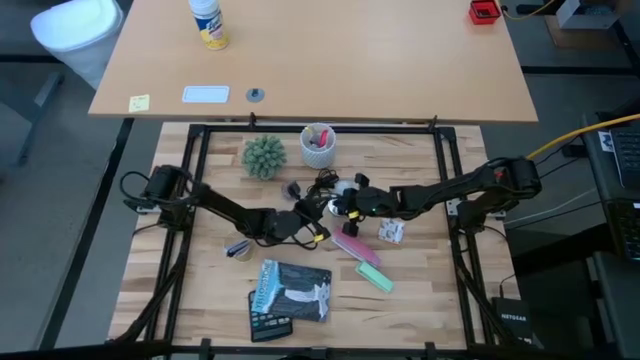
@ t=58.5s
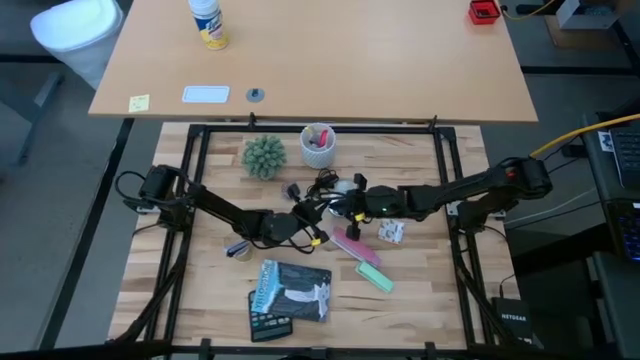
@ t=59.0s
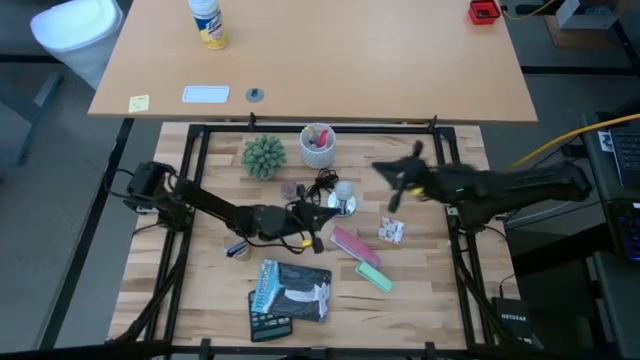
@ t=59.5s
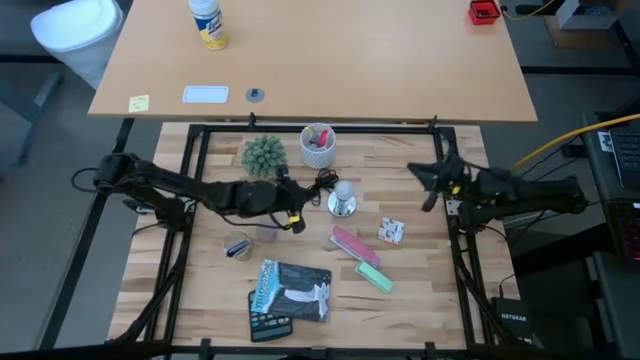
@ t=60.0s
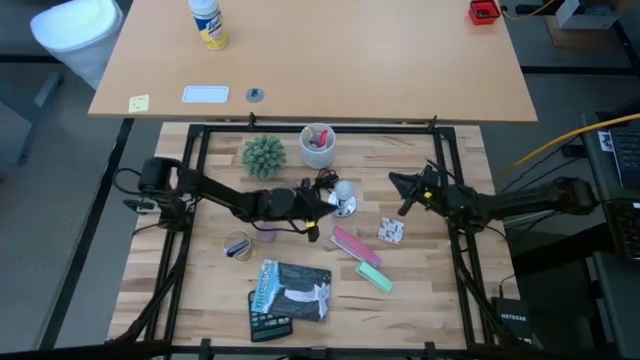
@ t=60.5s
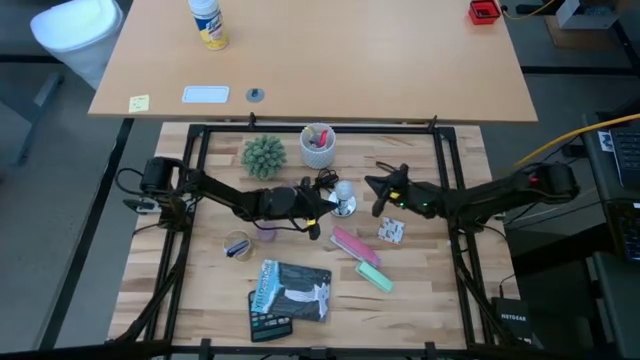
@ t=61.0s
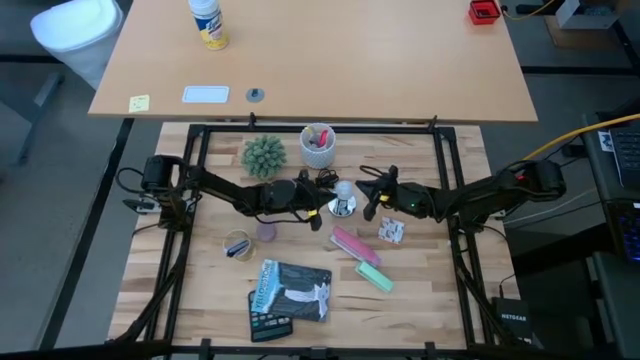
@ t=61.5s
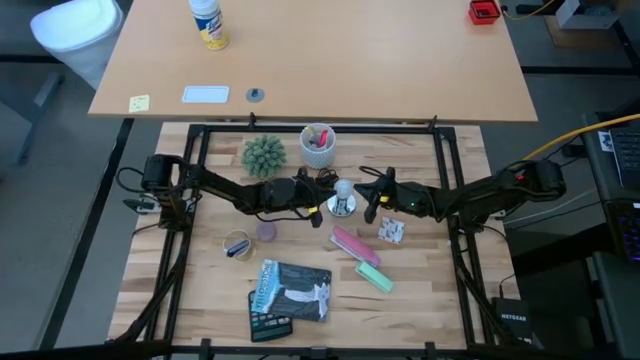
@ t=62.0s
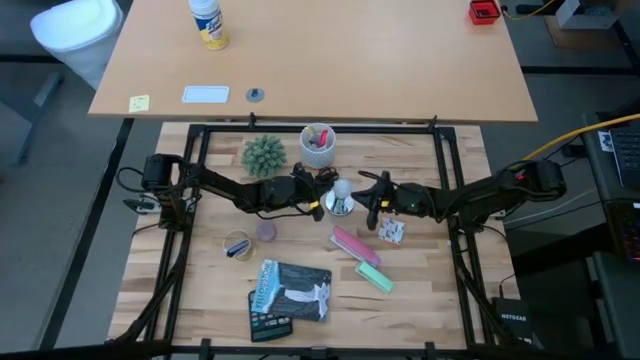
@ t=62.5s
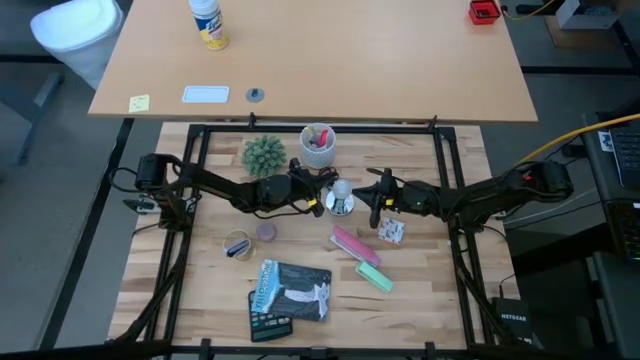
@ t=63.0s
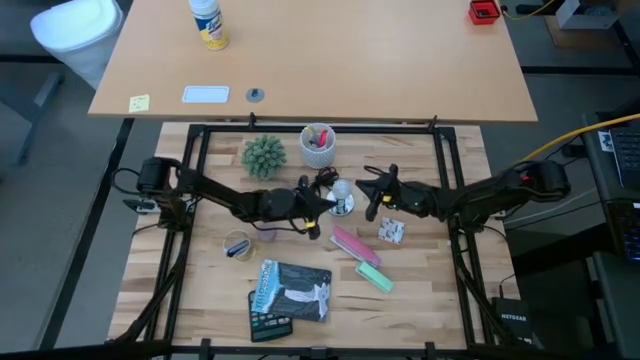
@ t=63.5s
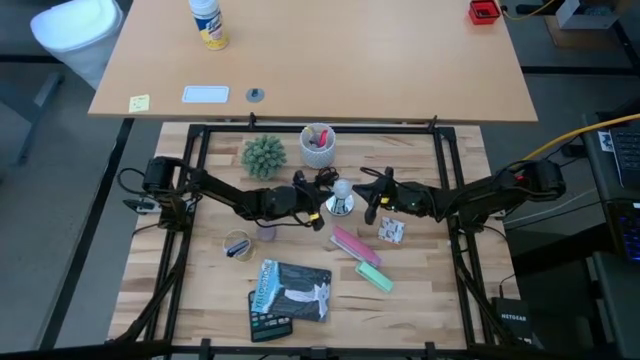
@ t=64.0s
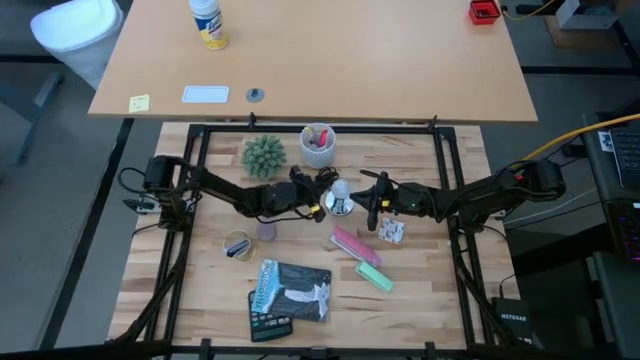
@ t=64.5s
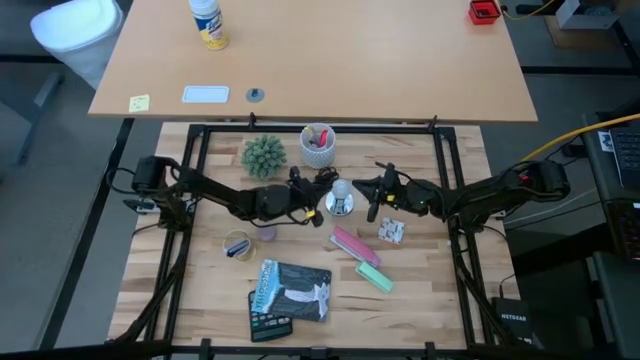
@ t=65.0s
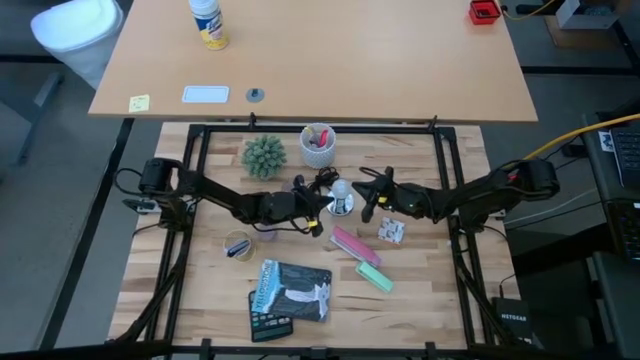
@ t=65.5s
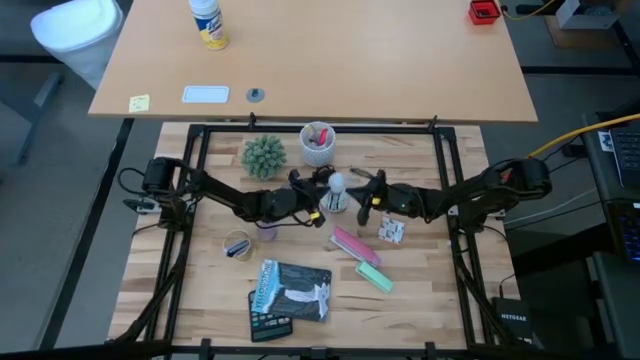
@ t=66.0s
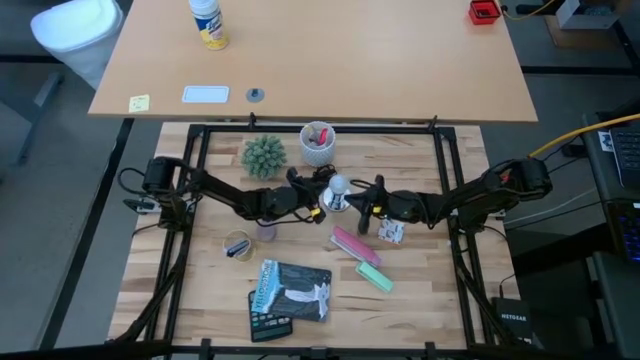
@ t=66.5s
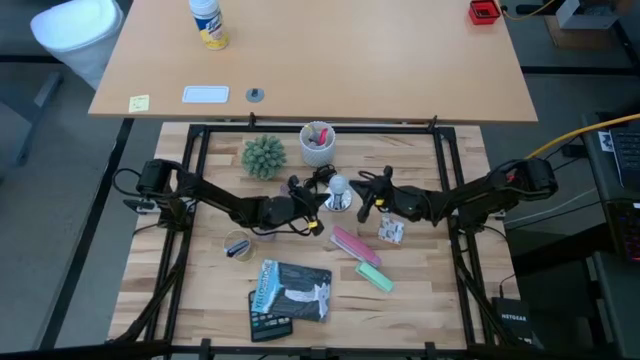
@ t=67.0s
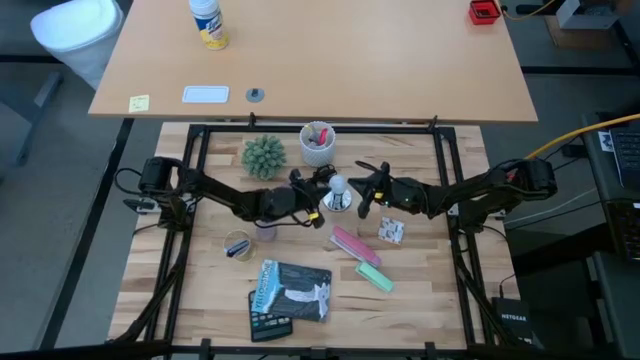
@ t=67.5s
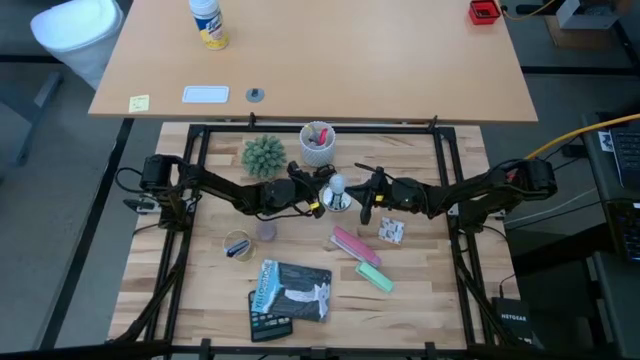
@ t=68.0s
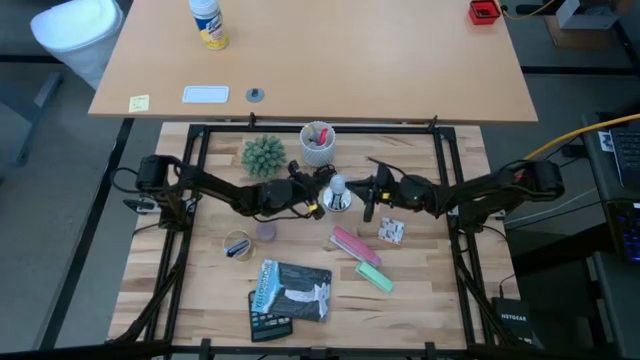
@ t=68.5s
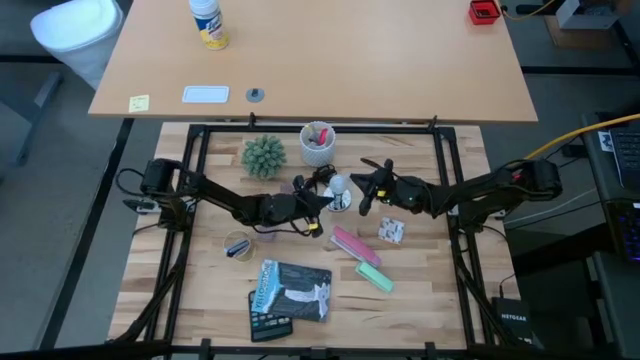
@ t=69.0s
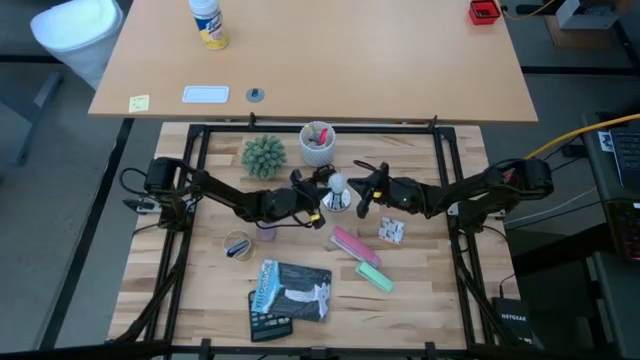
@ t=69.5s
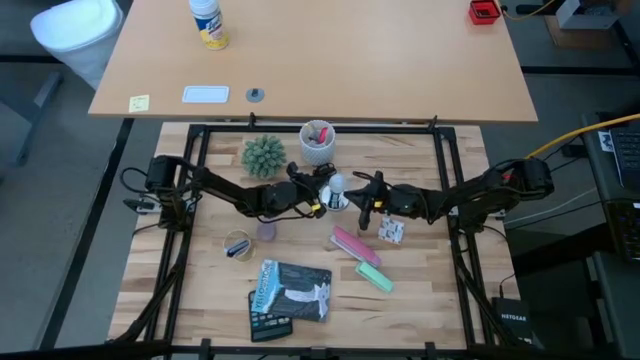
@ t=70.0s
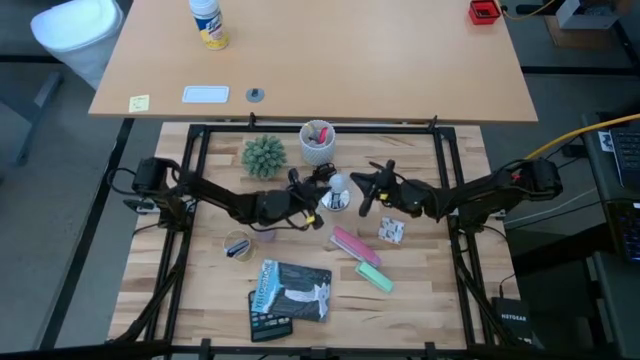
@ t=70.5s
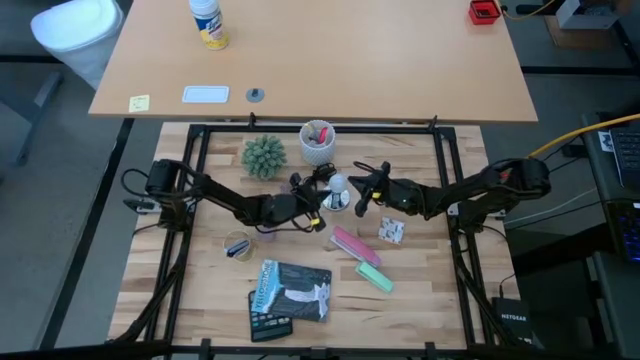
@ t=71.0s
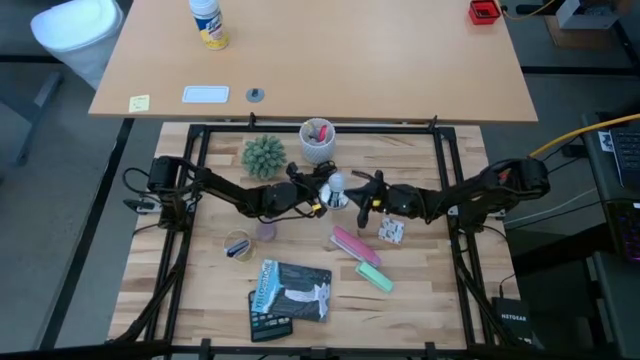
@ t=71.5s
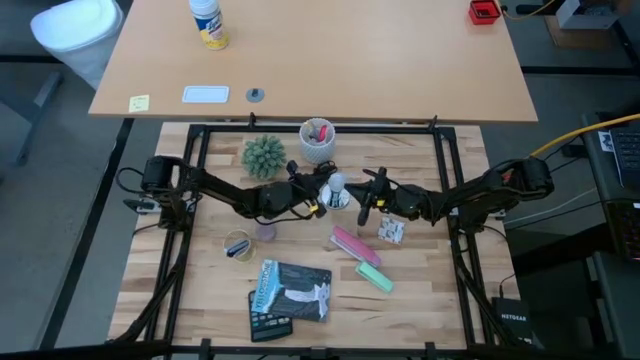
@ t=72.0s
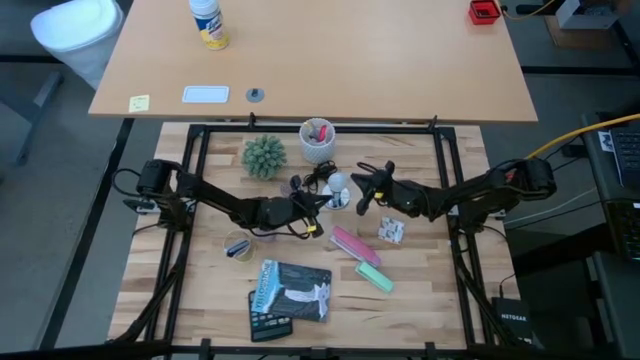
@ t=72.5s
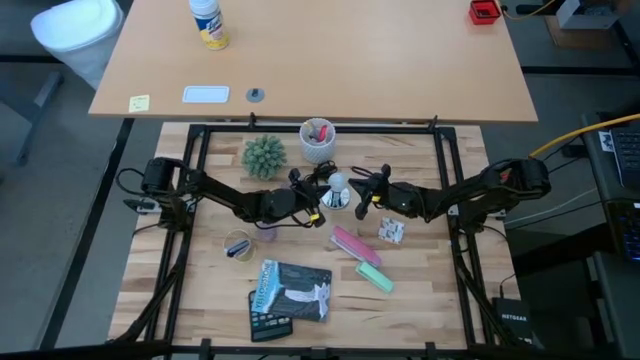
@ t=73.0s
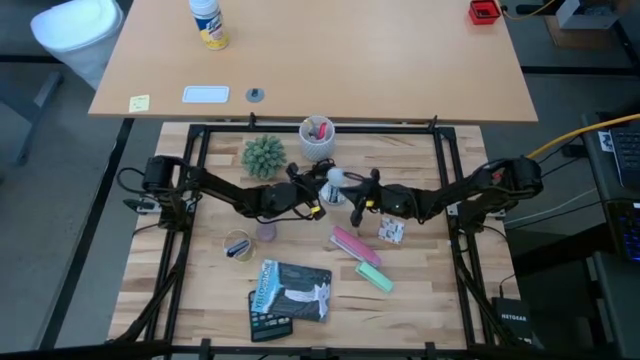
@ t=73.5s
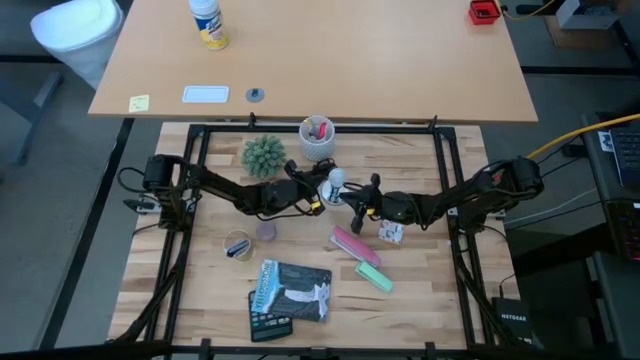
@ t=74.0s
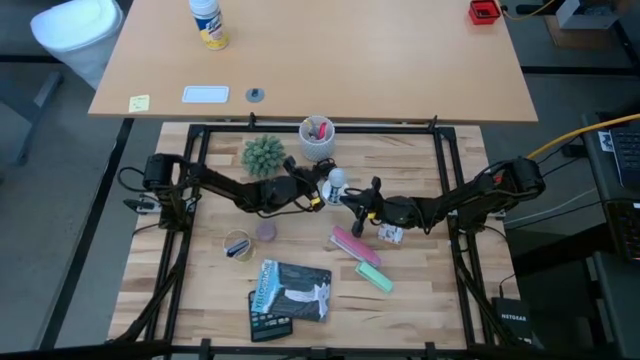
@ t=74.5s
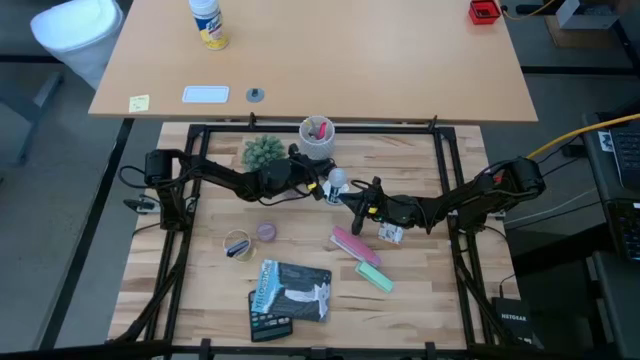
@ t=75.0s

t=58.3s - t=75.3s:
Task: Screw lightbulb
Remove the lightbulb from the lamp

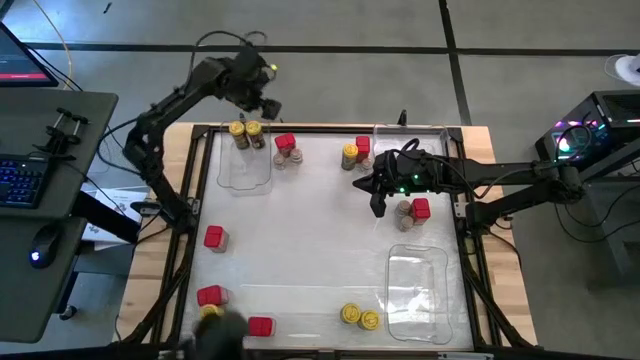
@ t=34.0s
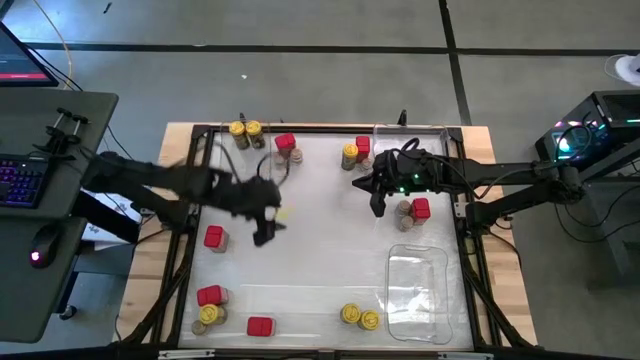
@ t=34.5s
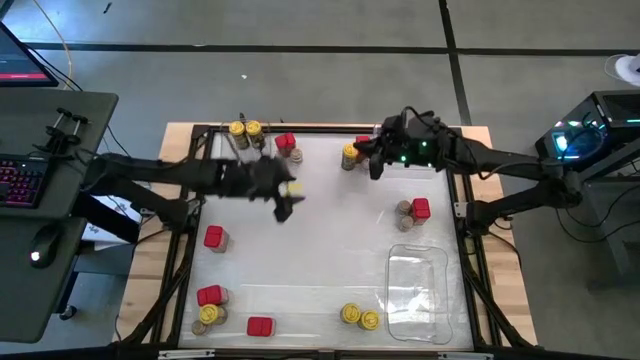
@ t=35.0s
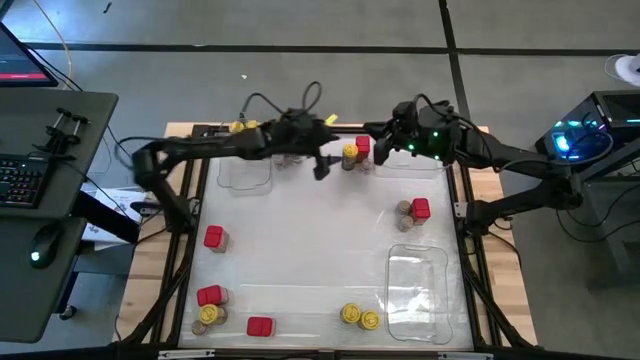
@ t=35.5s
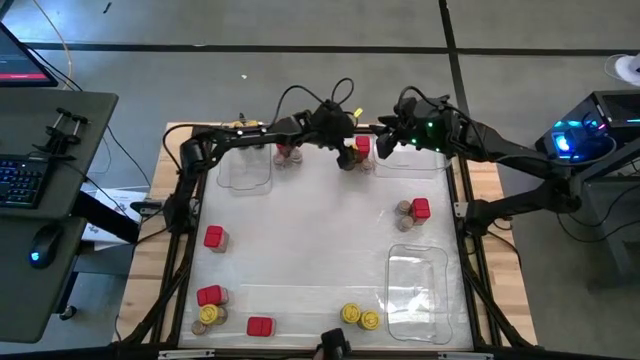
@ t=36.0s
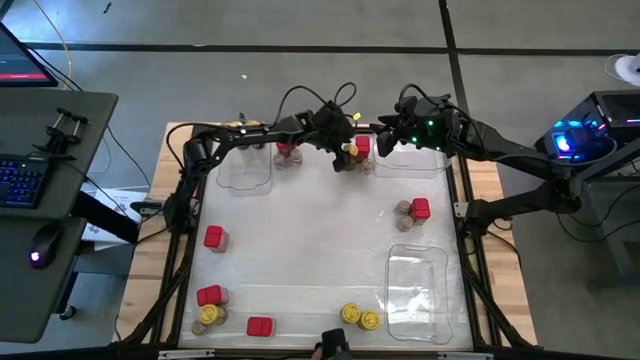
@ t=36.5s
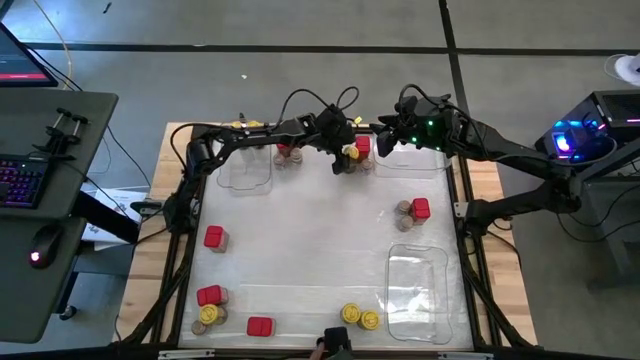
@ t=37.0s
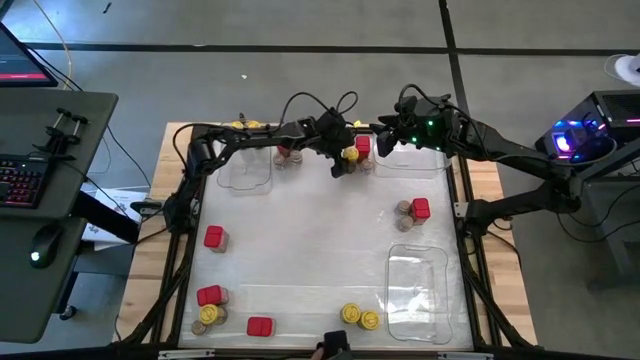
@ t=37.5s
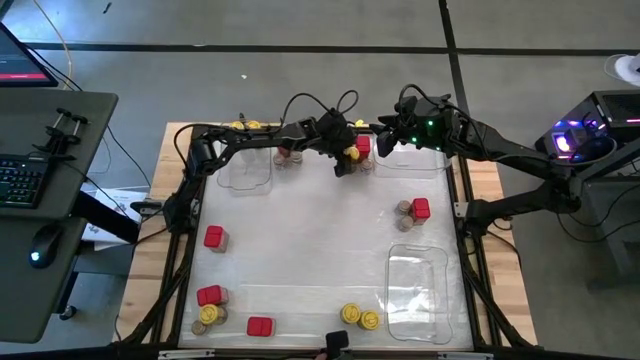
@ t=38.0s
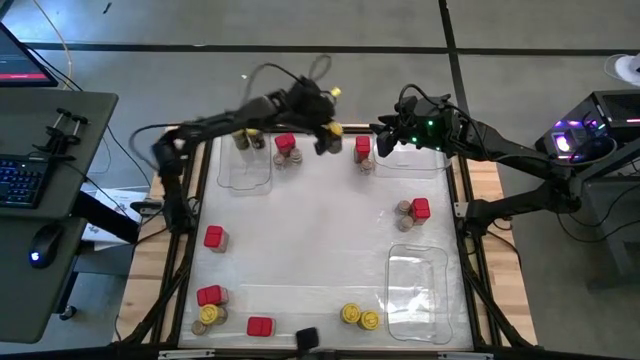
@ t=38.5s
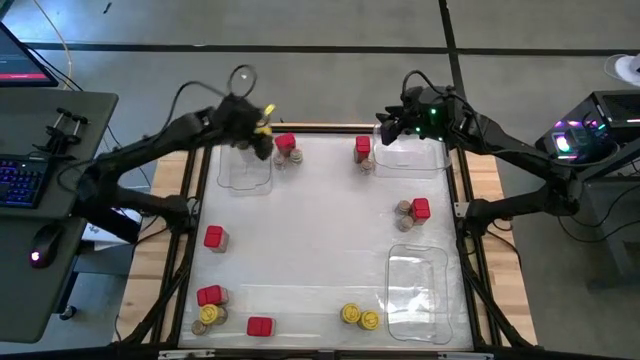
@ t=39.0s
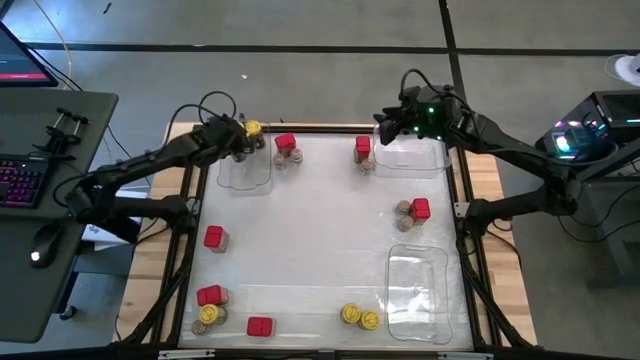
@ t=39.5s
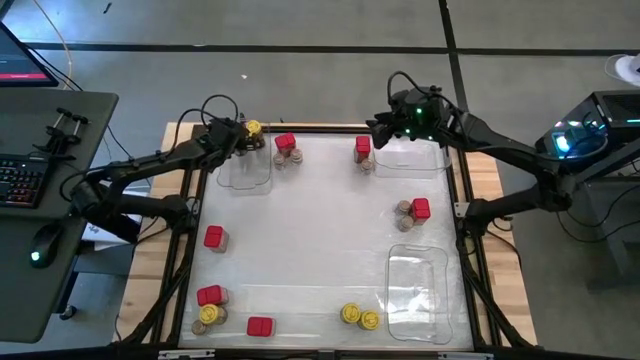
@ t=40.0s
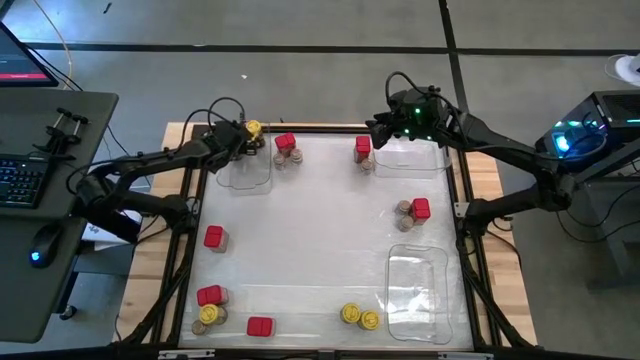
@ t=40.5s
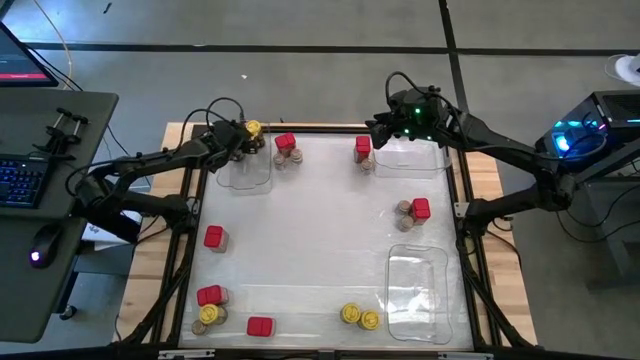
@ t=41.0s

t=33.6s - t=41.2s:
Task: Sort spices by type
Put the yellow seasoning bottle into the top left transparent bin
